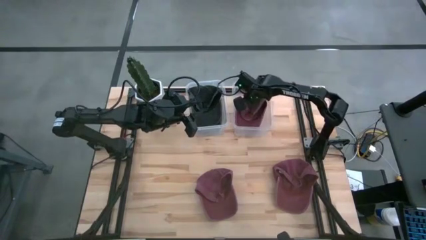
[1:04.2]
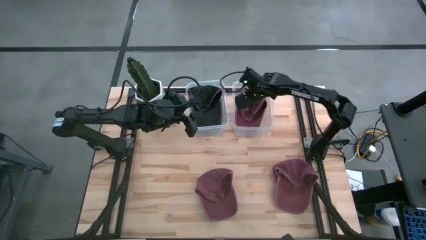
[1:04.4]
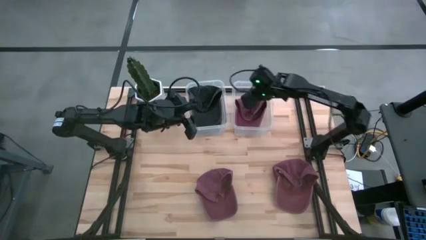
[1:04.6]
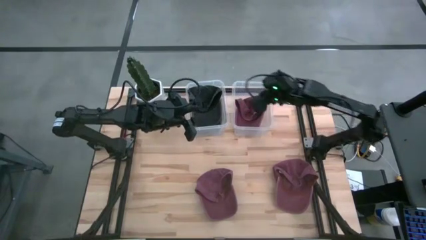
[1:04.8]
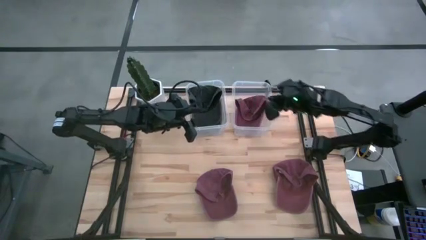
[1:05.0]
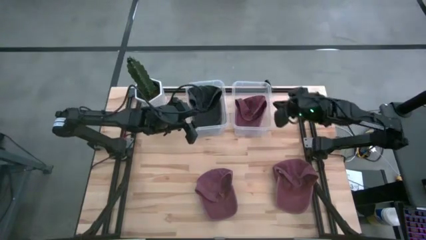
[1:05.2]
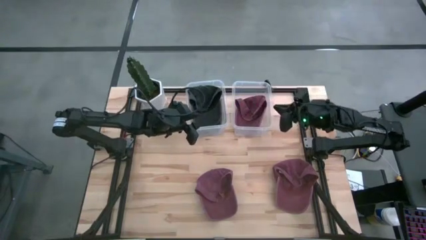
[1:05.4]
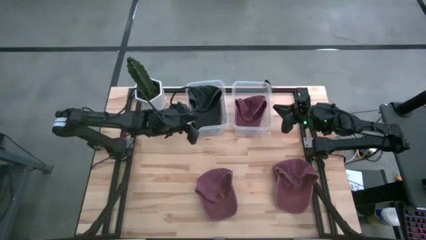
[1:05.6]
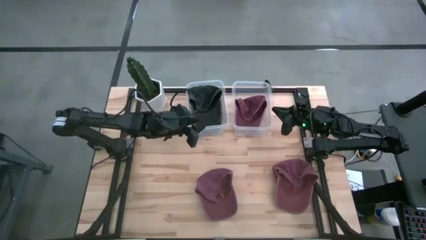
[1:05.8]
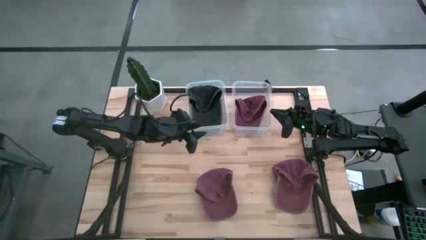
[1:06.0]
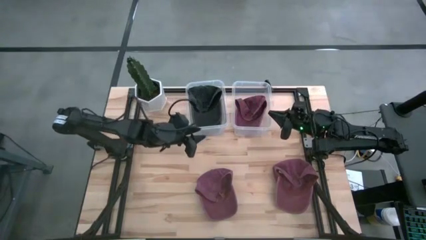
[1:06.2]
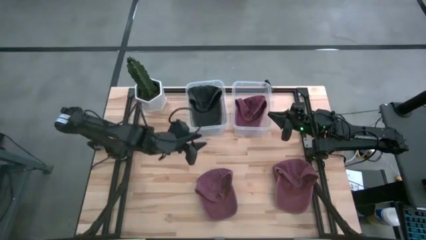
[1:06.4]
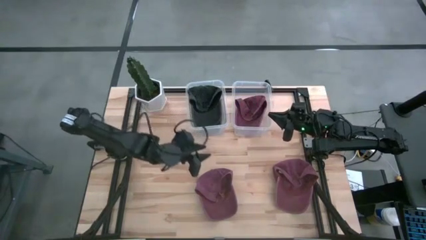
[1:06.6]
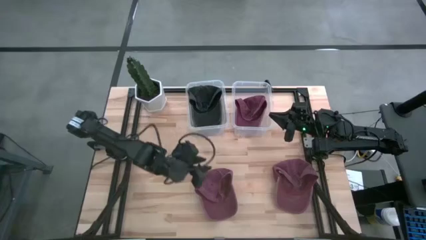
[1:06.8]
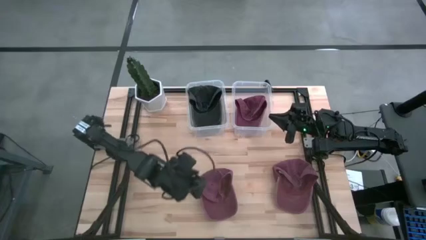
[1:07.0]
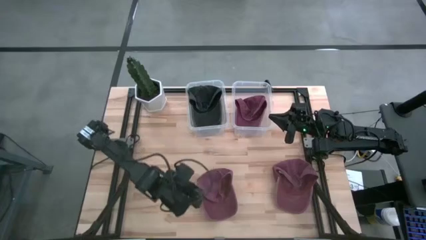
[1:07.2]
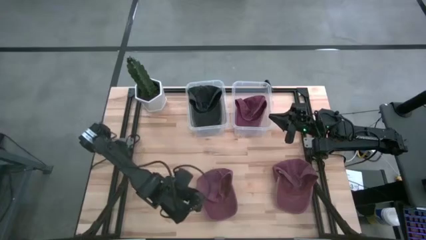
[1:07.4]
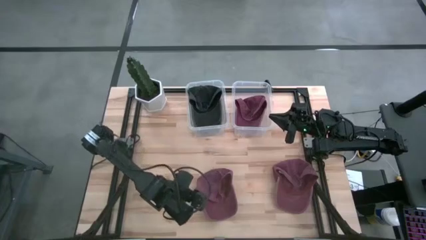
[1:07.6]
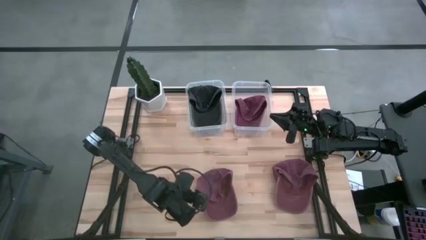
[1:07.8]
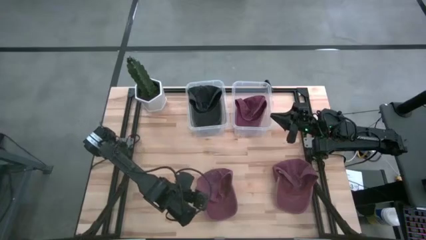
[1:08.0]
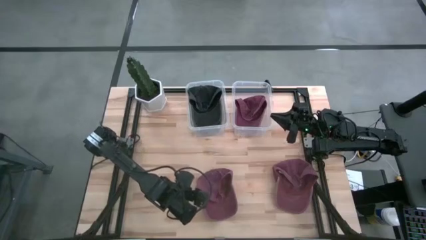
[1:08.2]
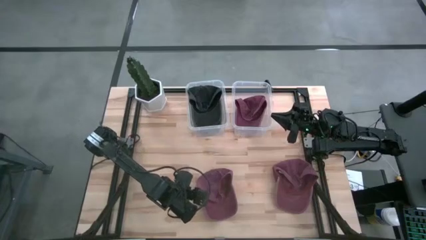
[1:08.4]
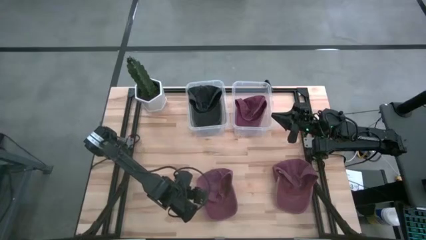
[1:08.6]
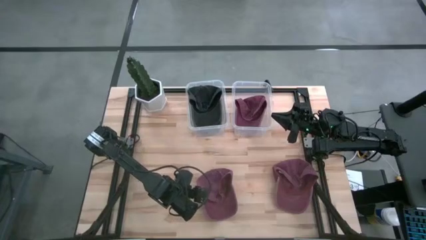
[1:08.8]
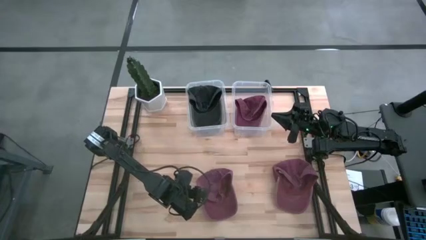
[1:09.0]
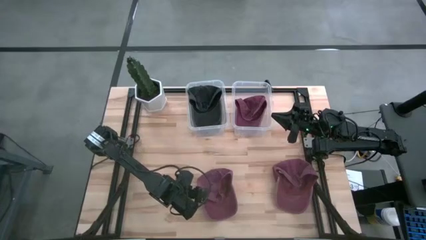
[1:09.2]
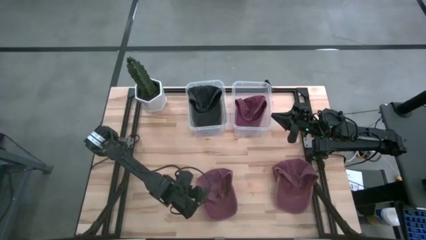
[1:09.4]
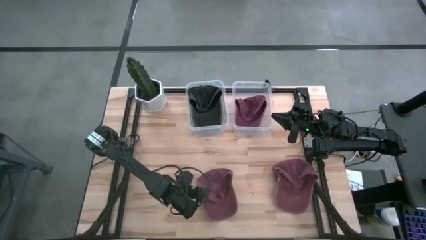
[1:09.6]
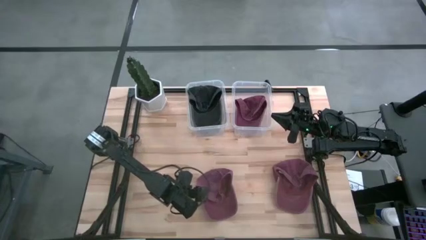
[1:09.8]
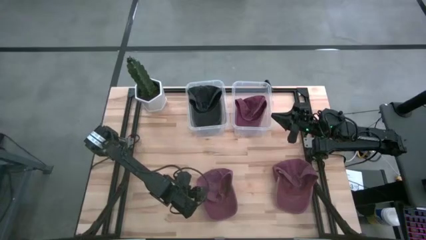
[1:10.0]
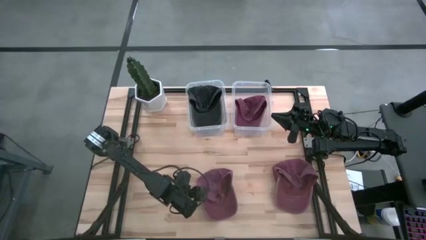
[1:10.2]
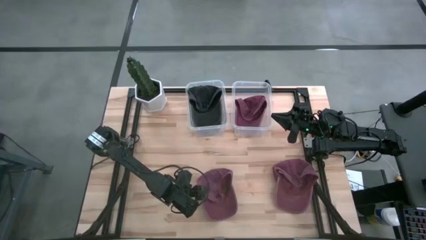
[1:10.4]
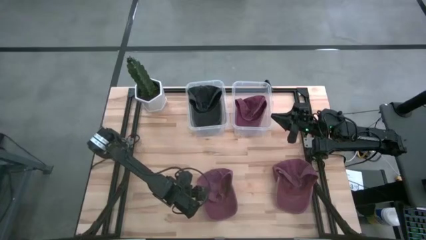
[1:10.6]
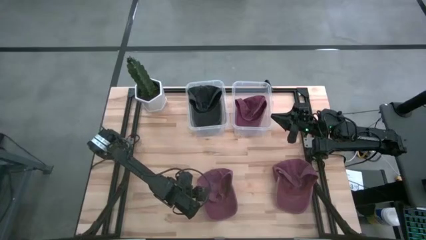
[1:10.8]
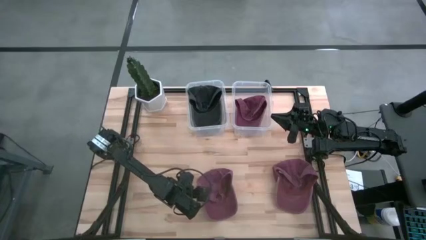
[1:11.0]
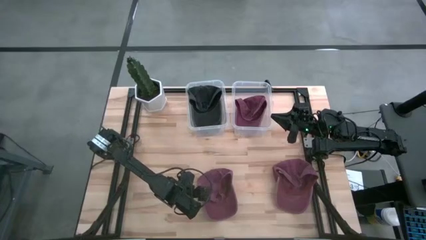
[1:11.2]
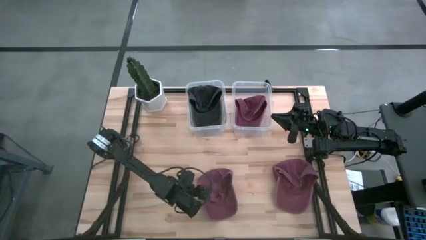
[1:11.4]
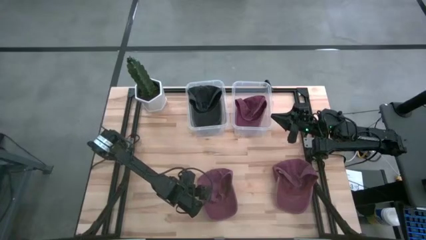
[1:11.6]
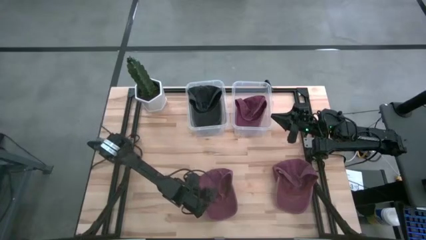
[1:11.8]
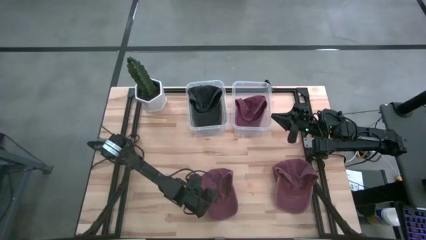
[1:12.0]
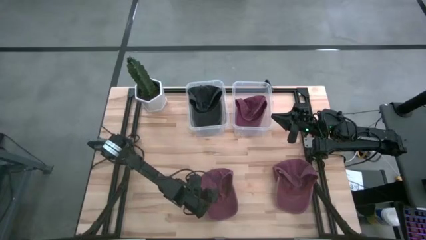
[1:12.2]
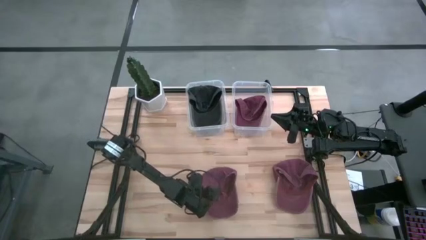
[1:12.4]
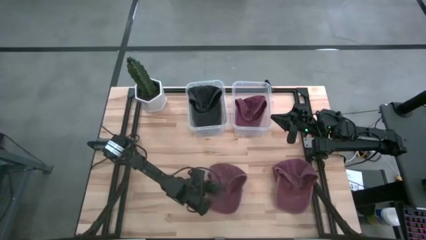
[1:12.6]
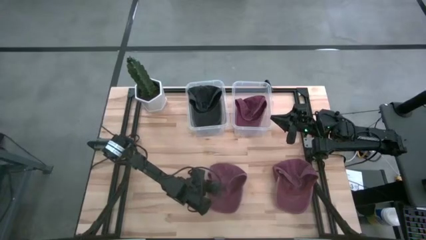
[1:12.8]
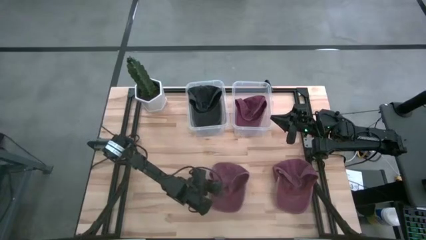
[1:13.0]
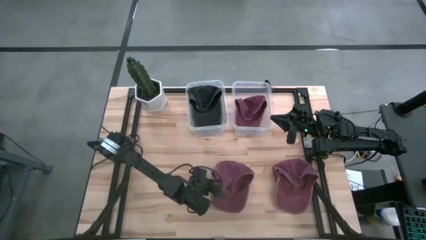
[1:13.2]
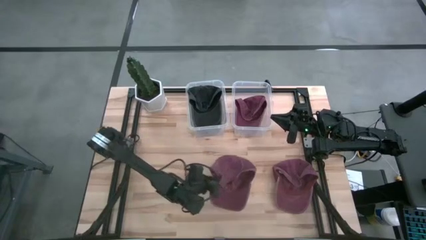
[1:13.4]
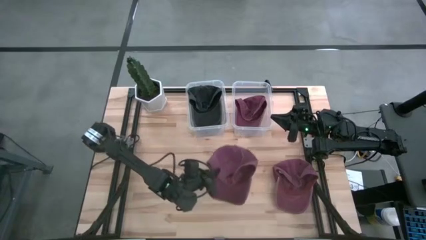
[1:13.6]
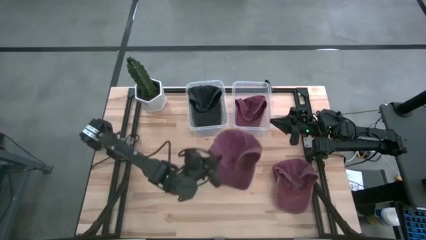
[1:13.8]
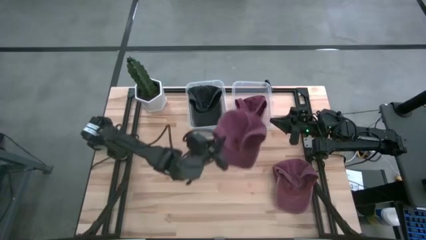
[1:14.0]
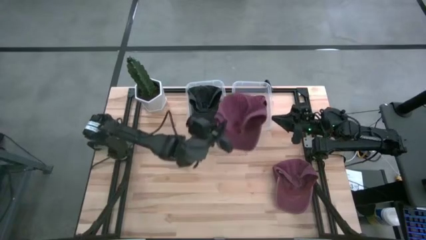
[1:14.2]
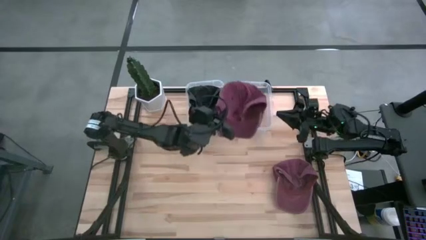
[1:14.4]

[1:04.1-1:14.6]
Task: Pick & Place hat
Put the left pink cap into the right transparent bin
